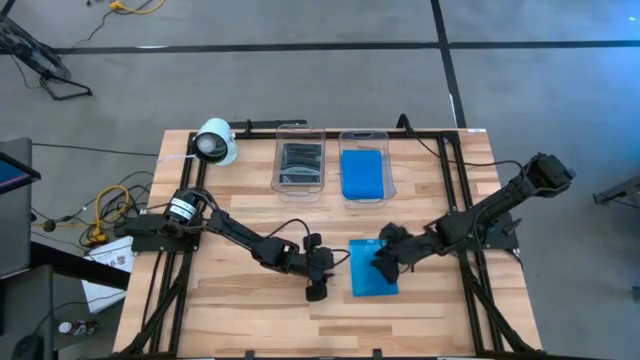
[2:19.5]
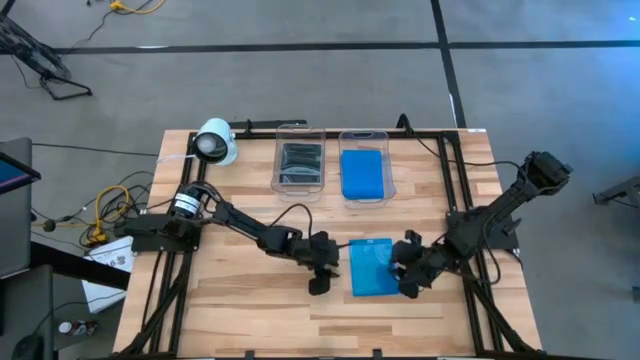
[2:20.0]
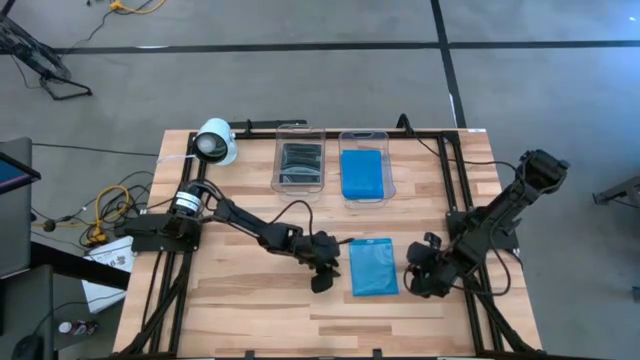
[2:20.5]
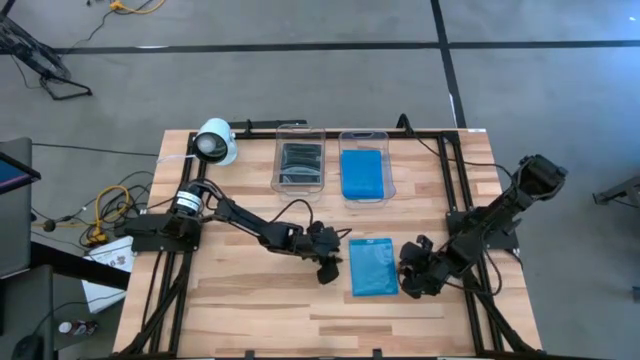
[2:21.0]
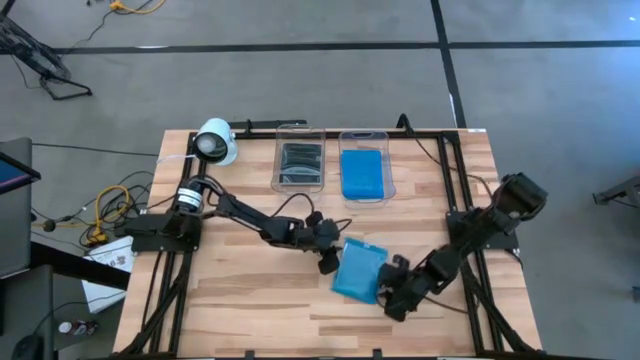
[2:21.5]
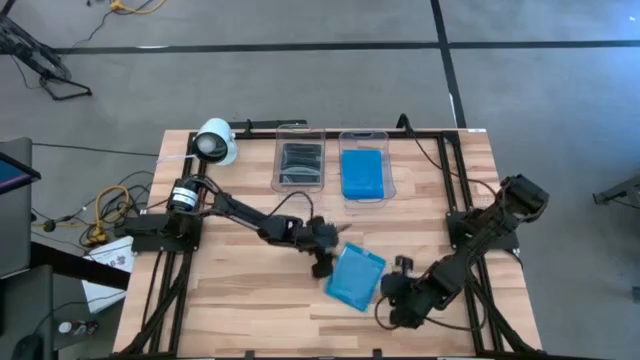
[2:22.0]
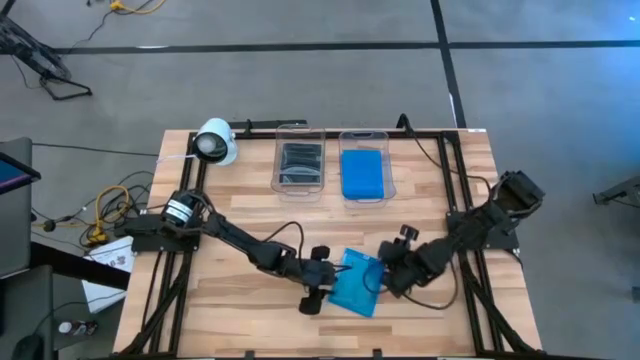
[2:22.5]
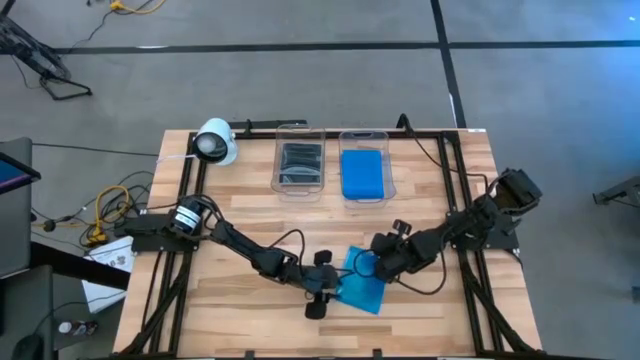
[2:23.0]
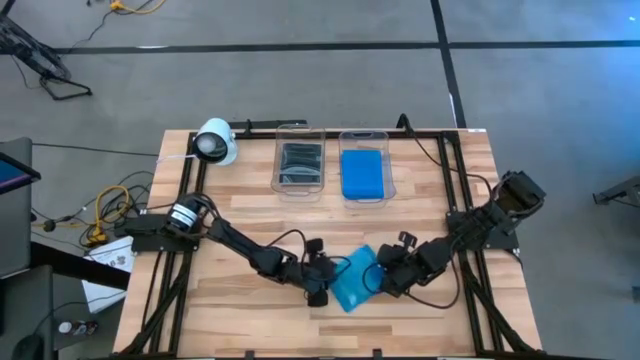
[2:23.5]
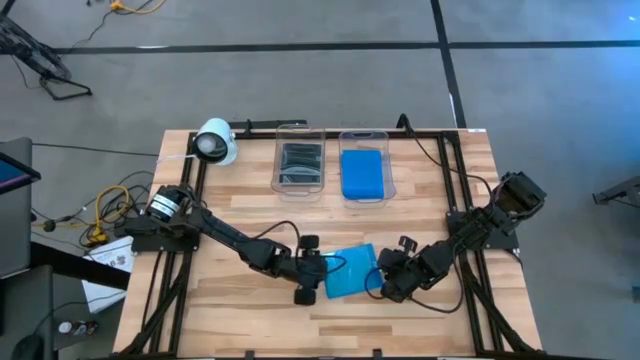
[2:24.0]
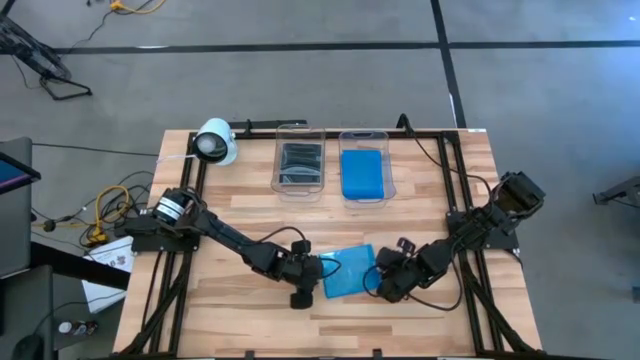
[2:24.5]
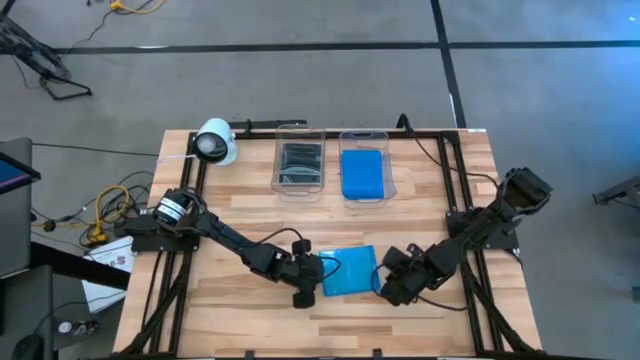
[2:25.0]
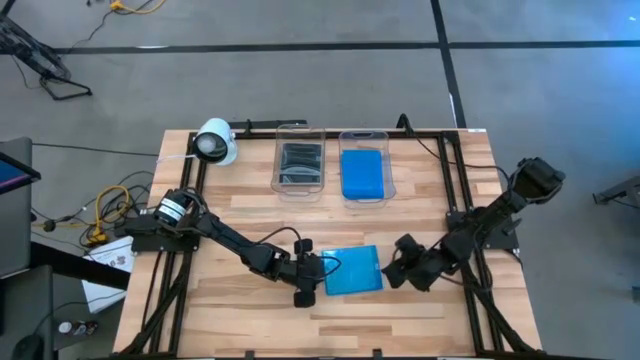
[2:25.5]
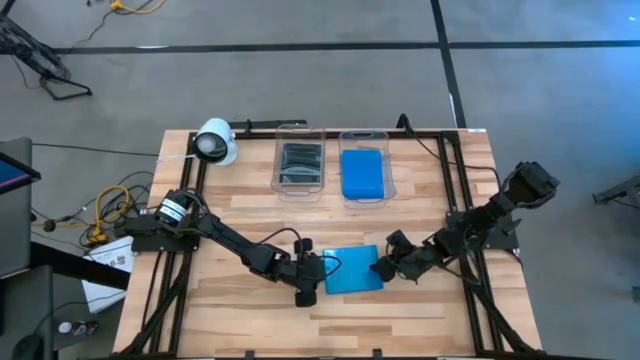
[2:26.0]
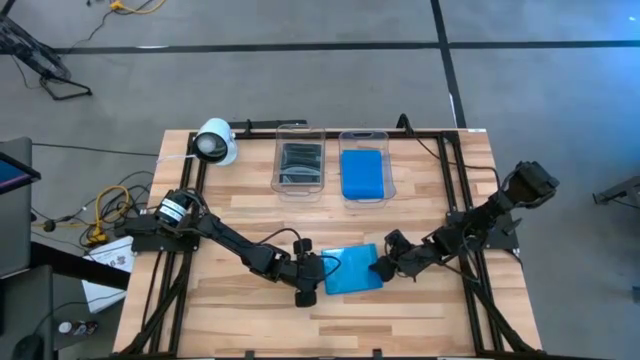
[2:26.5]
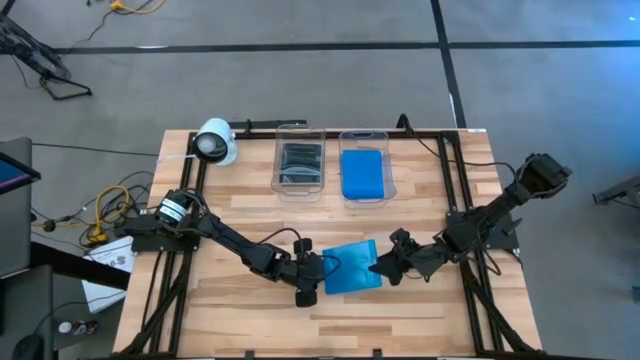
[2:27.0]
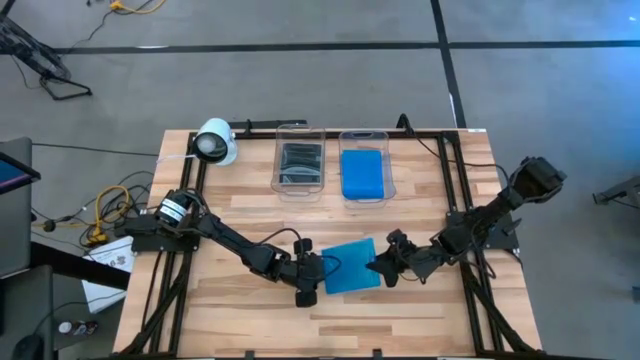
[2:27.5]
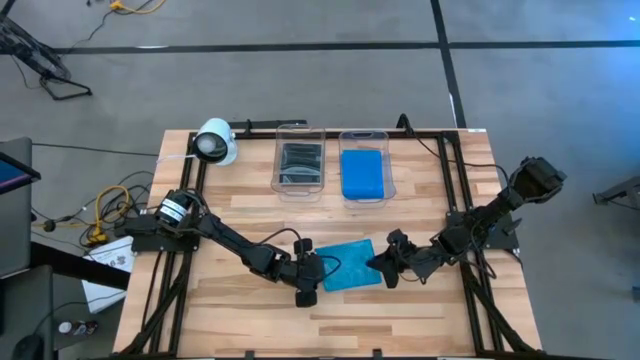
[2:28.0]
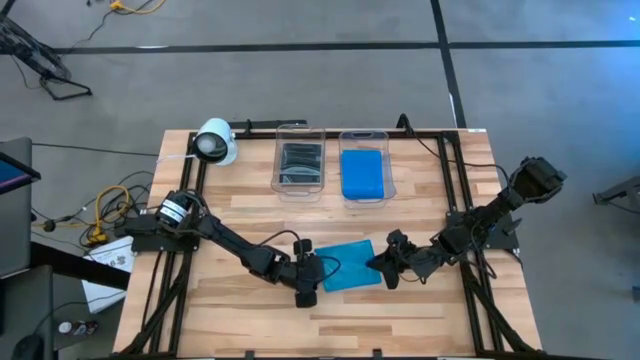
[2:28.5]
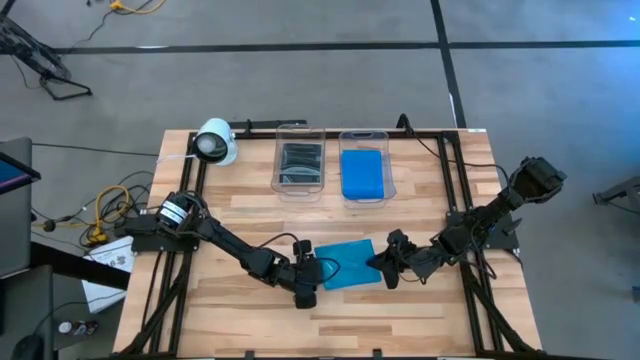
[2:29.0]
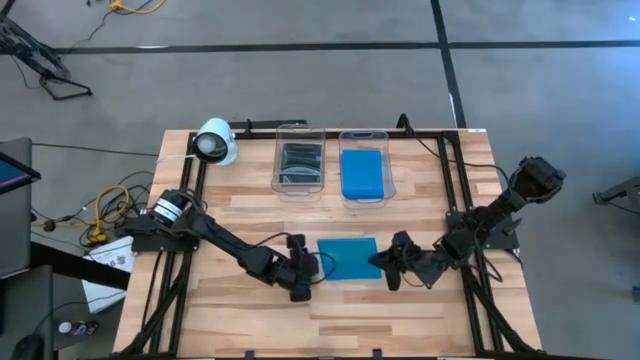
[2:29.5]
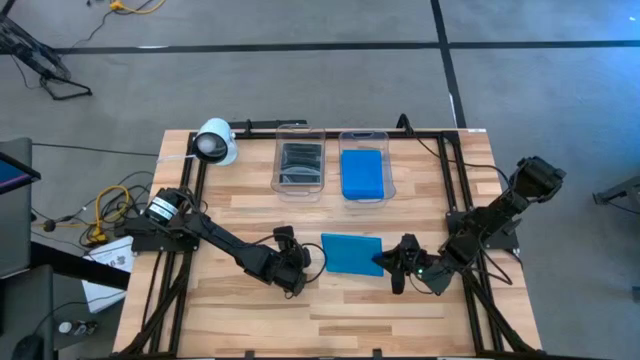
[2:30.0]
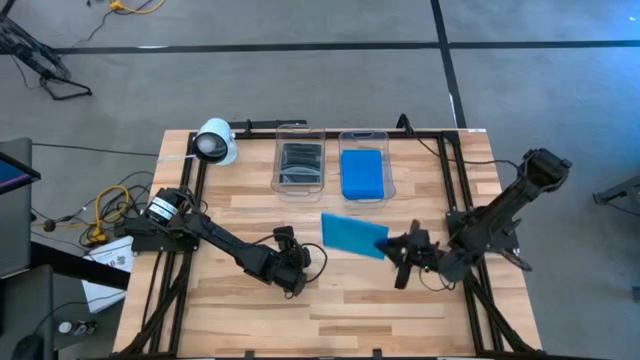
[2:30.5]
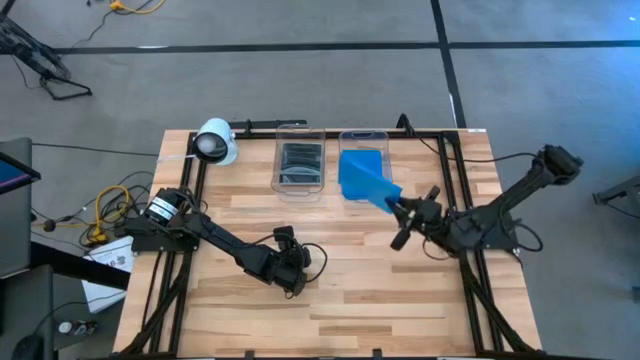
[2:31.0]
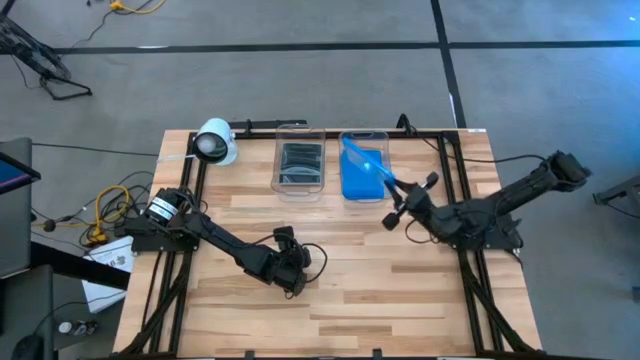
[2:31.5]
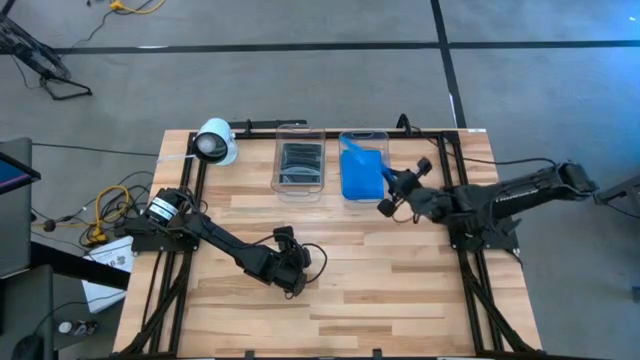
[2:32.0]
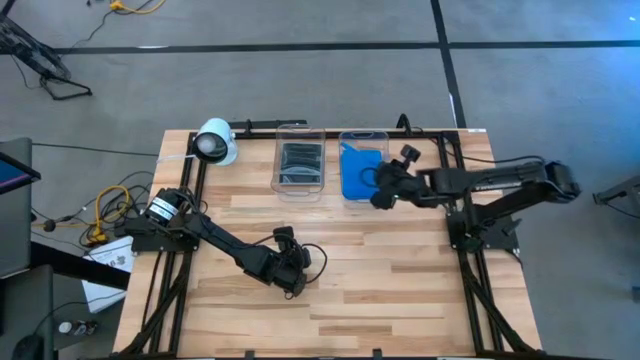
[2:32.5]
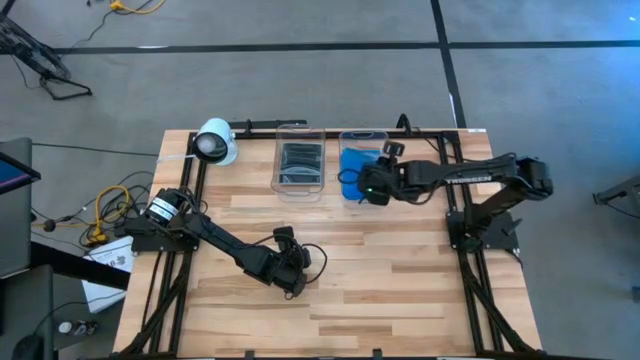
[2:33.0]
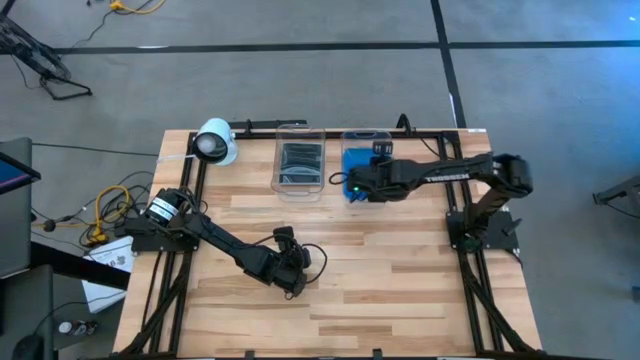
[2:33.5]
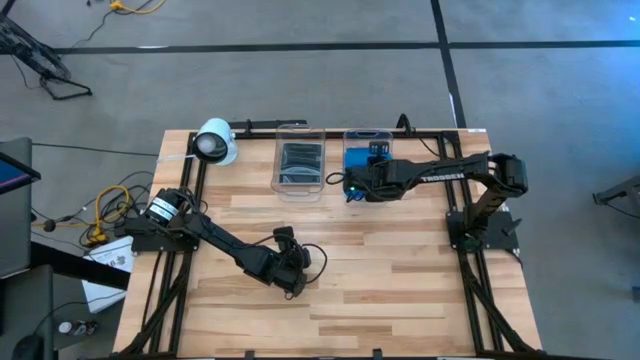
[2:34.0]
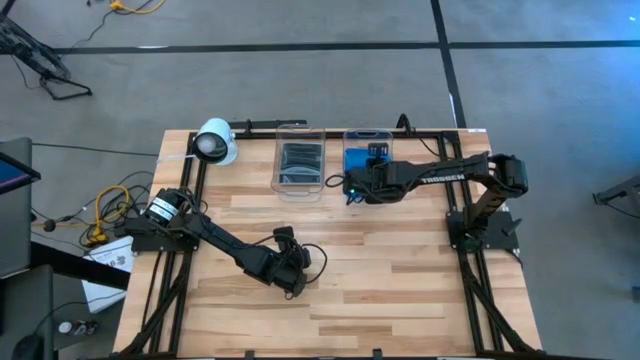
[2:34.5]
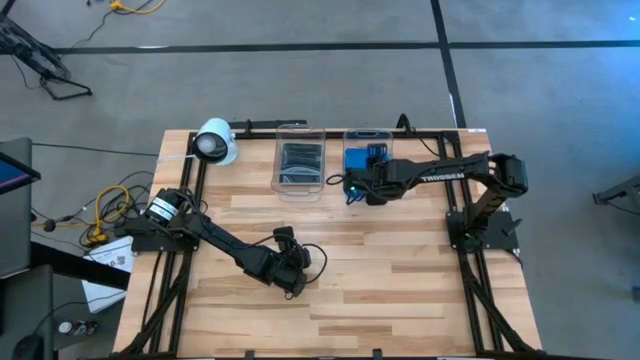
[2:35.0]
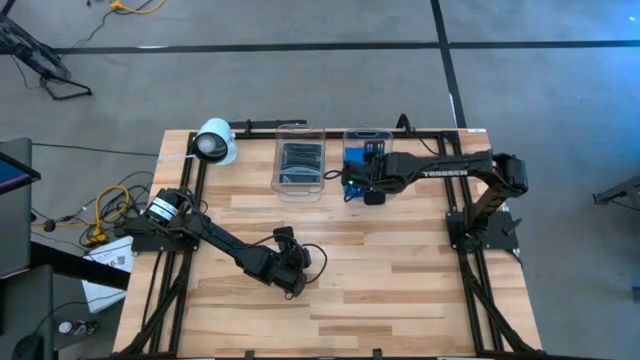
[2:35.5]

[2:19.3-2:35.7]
Task: Pick & place jewel cases by type
Put the blue CD case into the right transparent bin

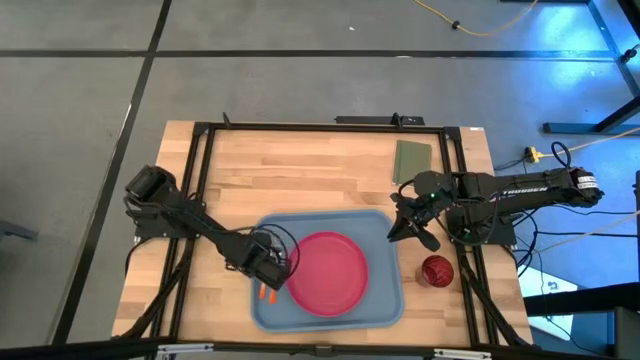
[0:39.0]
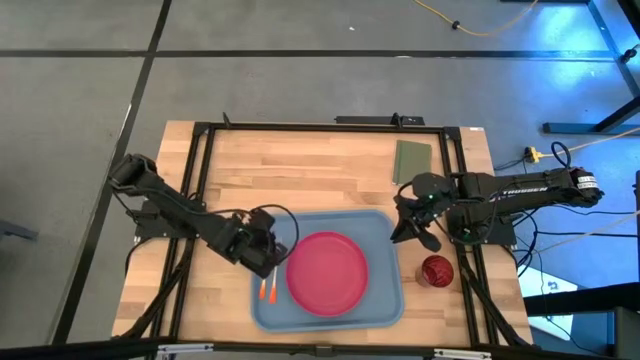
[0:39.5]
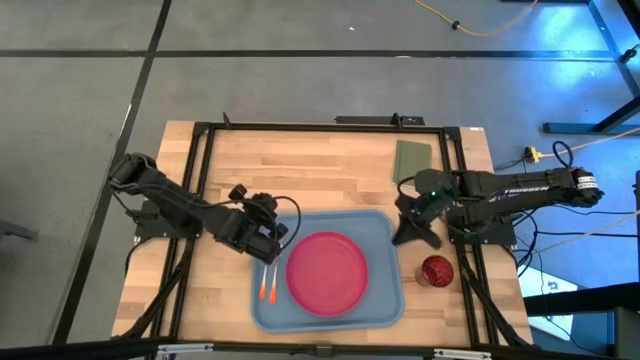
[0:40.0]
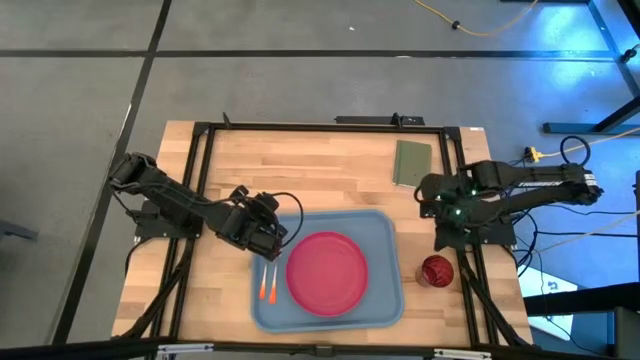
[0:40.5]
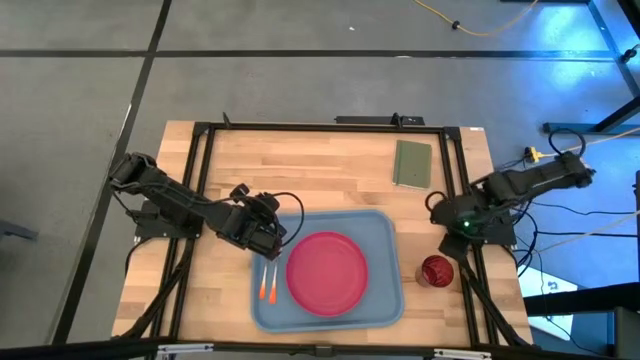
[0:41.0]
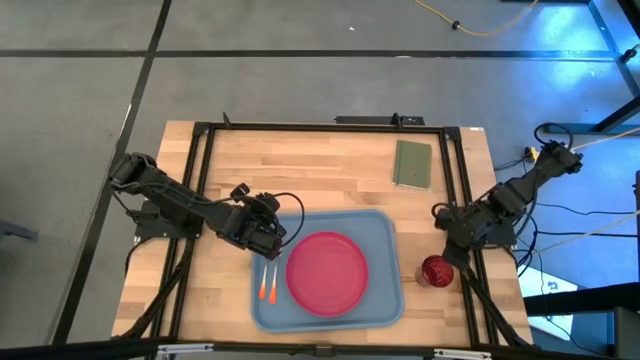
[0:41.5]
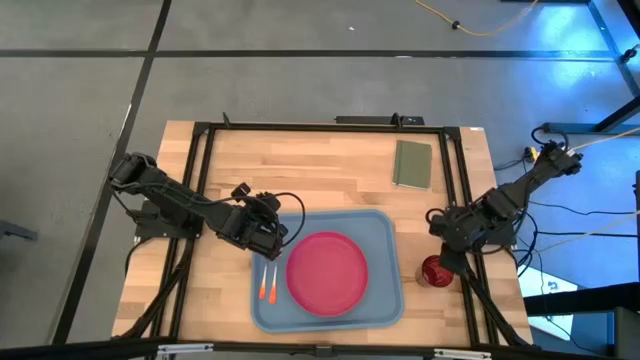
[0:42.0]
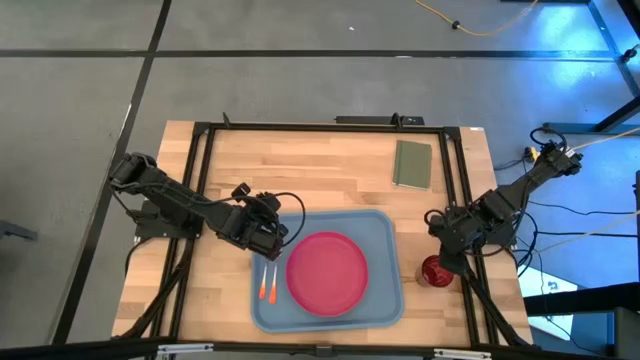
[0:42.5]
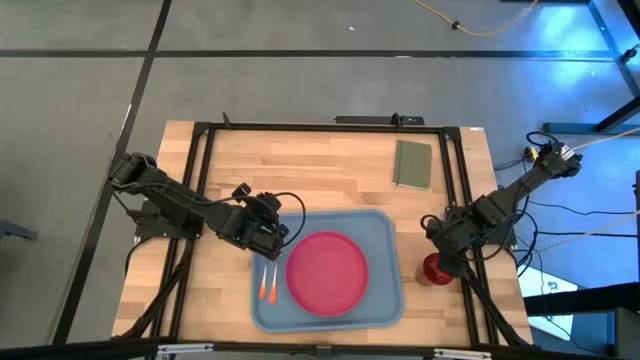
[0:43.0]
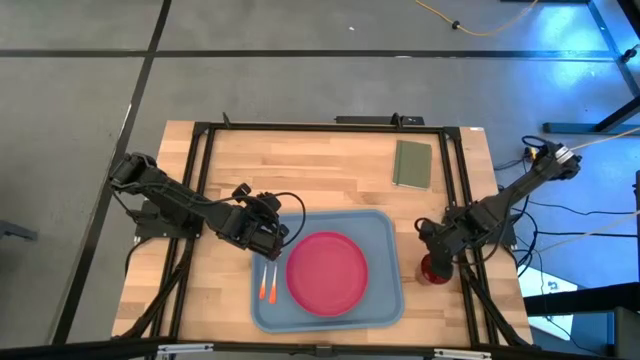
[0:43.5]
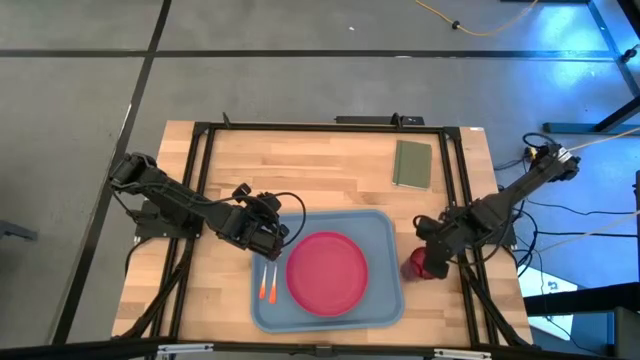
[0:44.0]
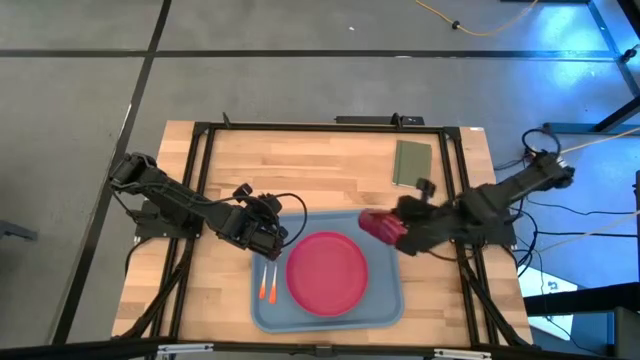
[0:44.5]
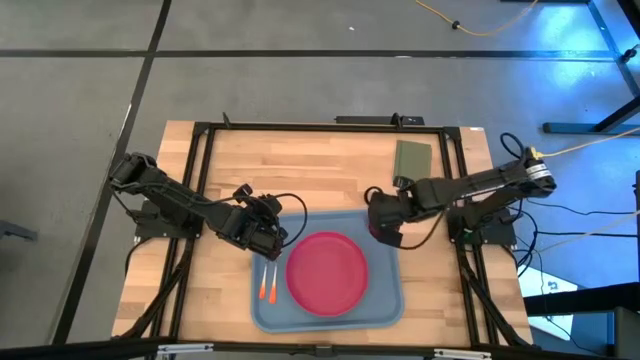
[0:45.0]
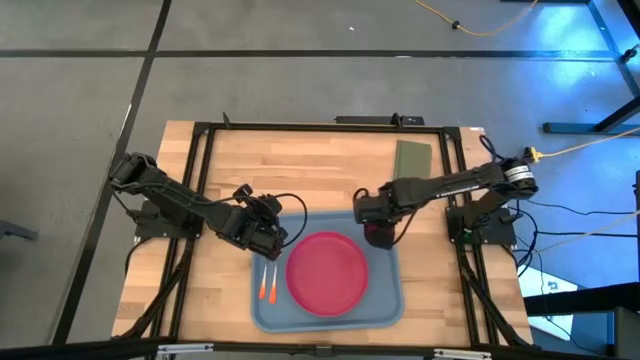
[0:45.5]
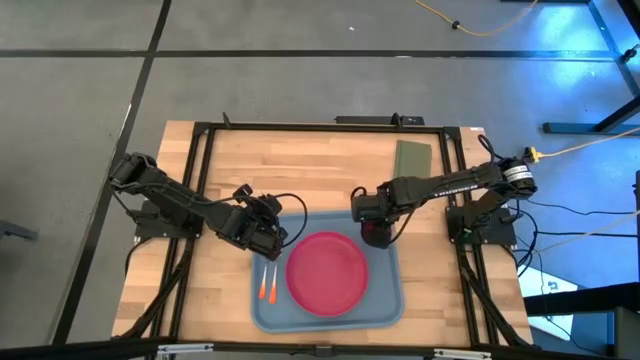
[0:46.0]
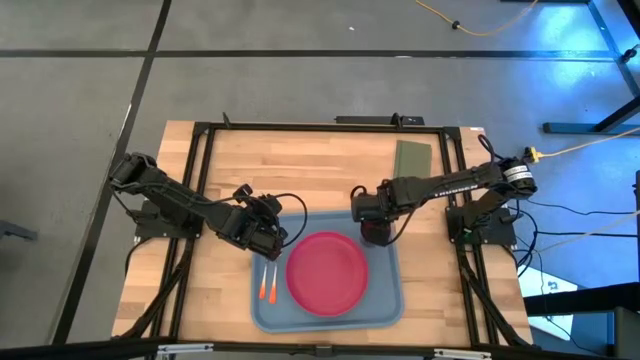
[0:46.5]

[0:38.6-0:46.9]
Task: Pick and place plate/cup/fork/spoon on tray
Put the pink cup on the blue tray to the top right of the blue tray
